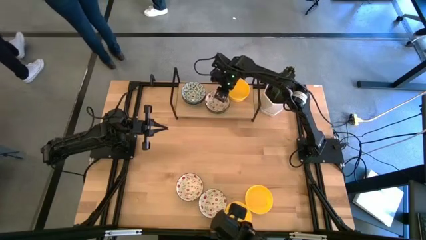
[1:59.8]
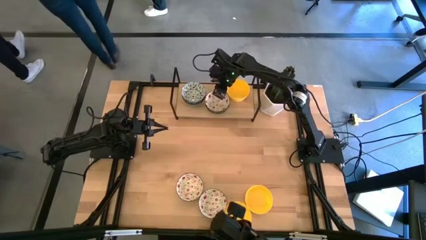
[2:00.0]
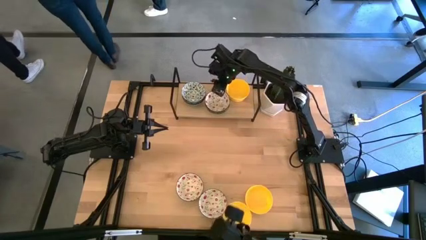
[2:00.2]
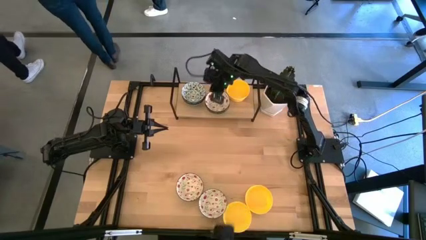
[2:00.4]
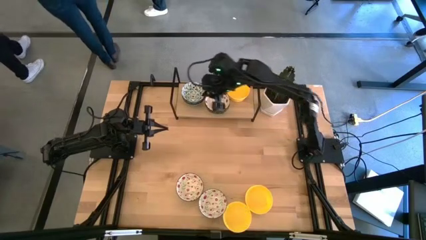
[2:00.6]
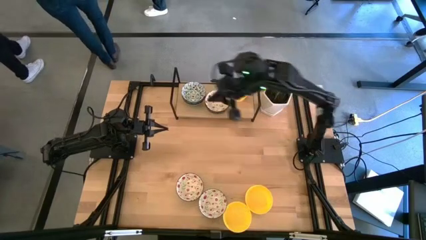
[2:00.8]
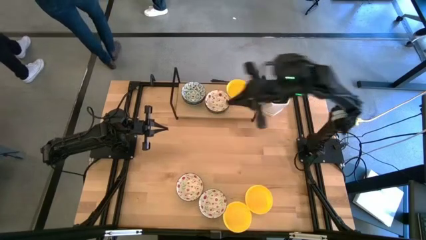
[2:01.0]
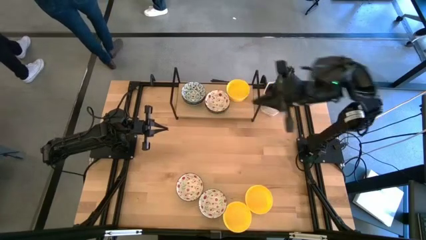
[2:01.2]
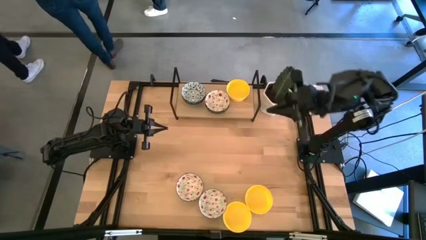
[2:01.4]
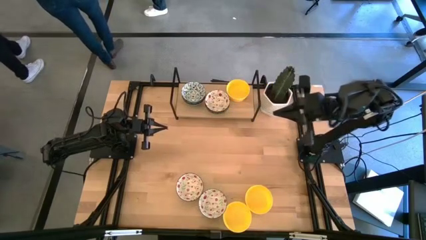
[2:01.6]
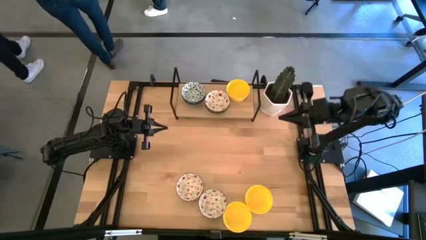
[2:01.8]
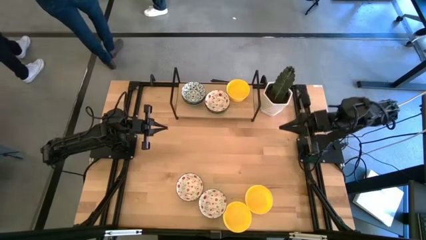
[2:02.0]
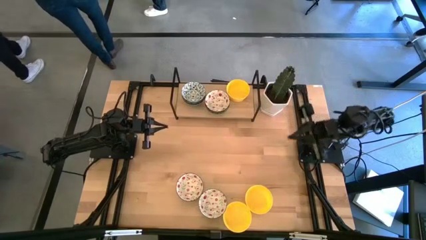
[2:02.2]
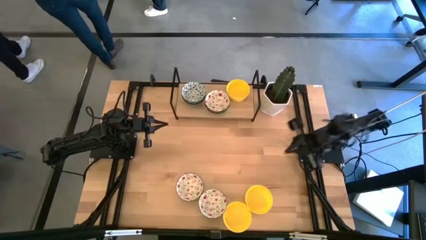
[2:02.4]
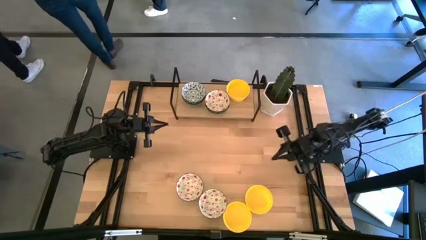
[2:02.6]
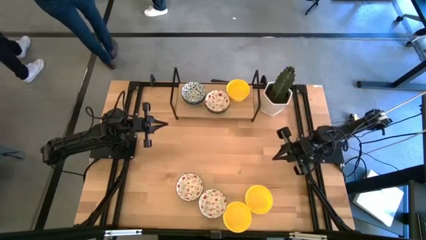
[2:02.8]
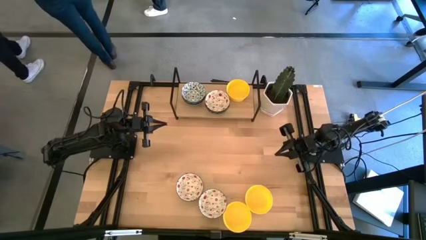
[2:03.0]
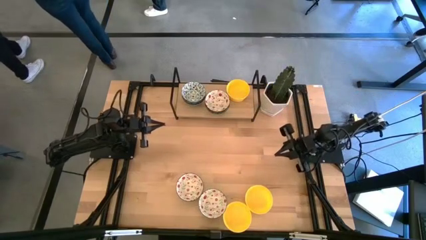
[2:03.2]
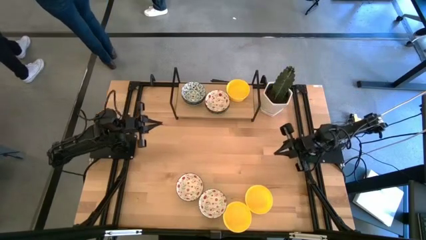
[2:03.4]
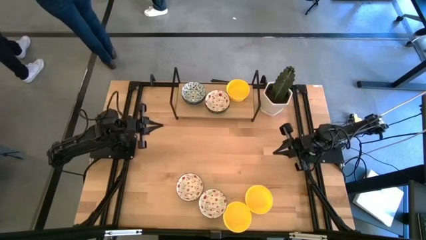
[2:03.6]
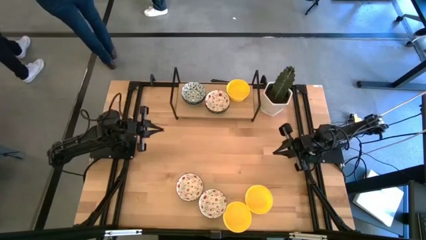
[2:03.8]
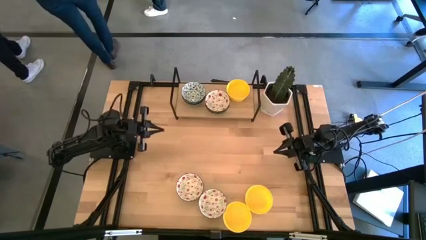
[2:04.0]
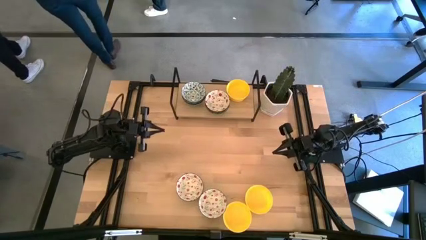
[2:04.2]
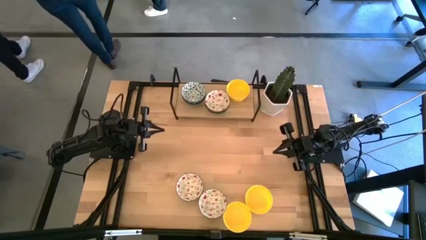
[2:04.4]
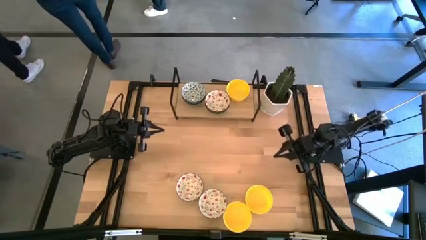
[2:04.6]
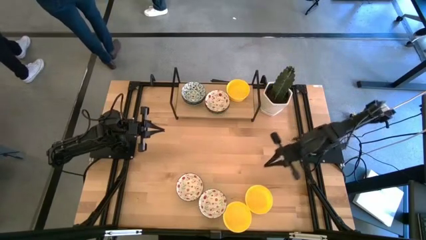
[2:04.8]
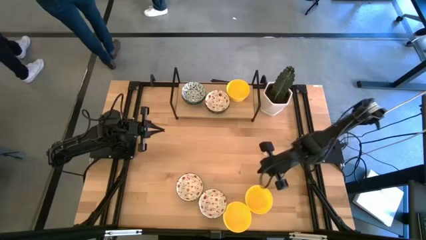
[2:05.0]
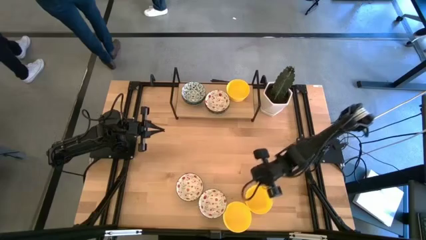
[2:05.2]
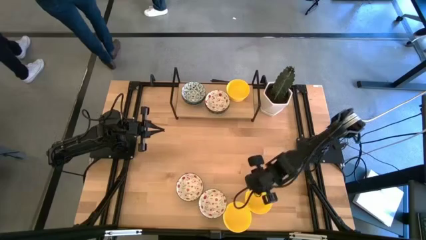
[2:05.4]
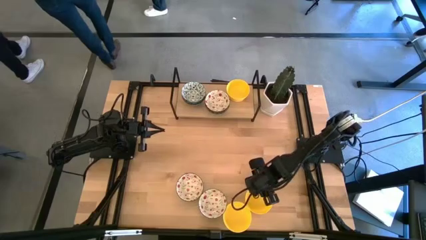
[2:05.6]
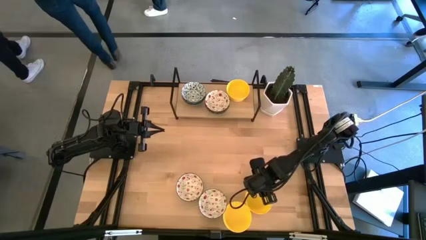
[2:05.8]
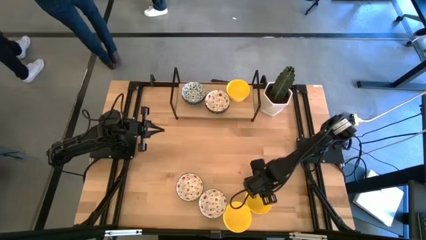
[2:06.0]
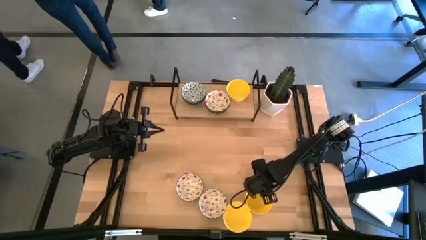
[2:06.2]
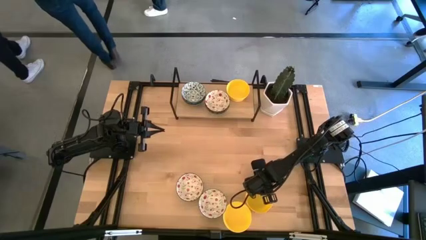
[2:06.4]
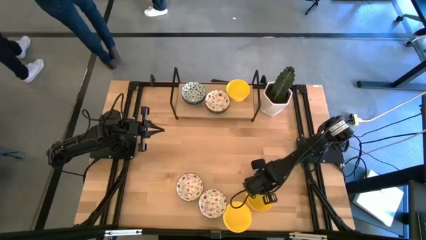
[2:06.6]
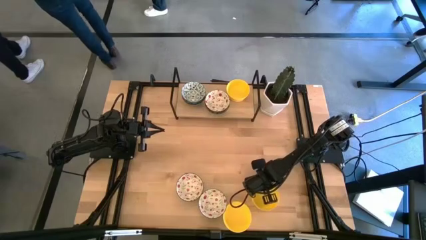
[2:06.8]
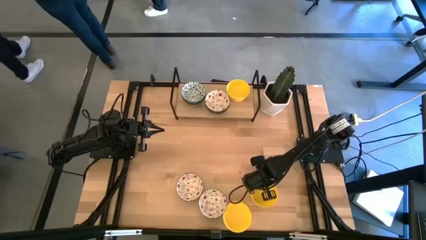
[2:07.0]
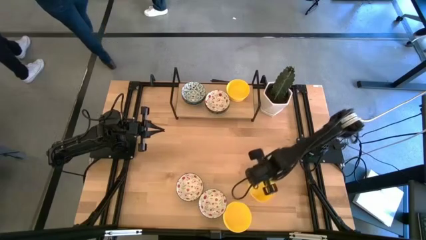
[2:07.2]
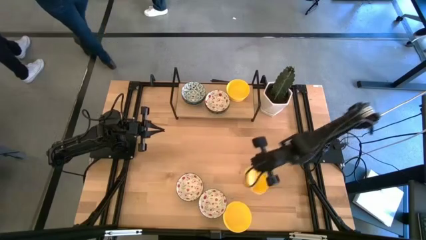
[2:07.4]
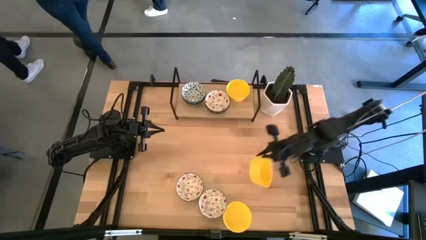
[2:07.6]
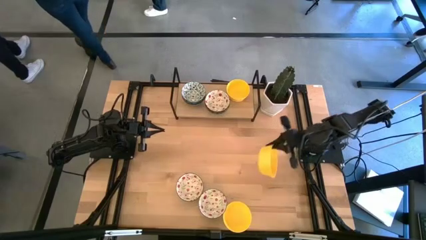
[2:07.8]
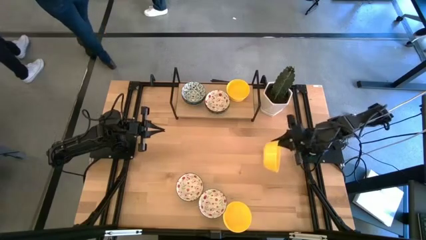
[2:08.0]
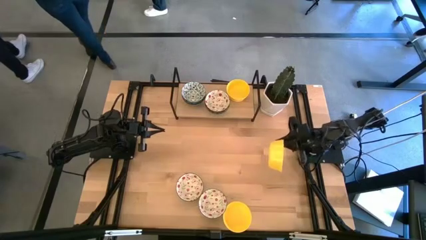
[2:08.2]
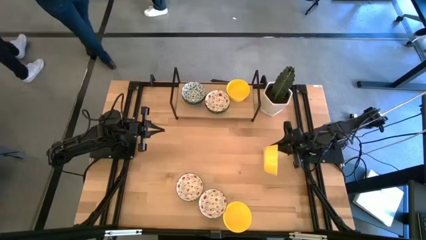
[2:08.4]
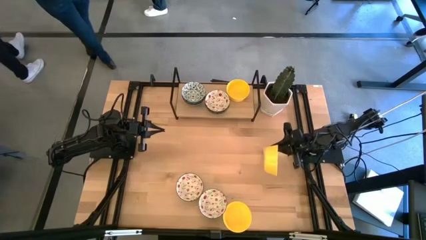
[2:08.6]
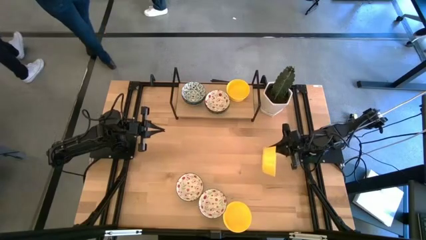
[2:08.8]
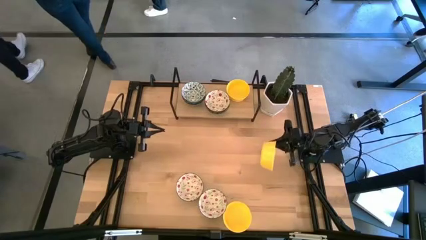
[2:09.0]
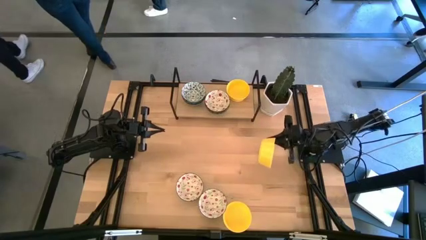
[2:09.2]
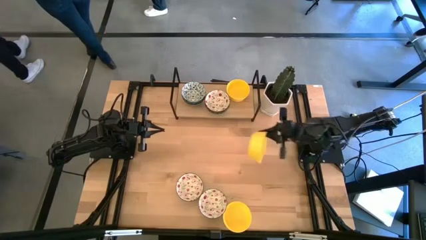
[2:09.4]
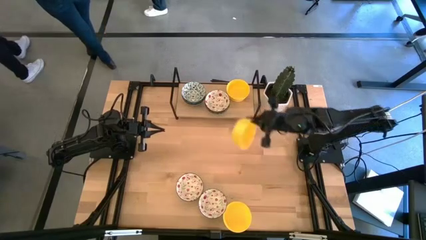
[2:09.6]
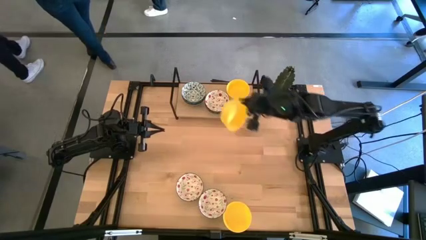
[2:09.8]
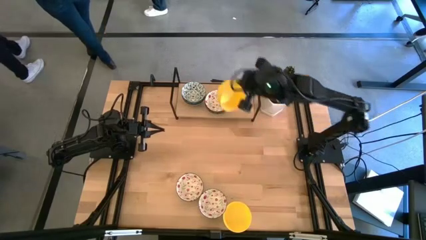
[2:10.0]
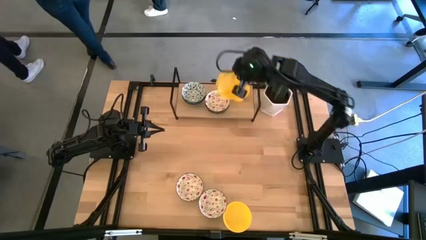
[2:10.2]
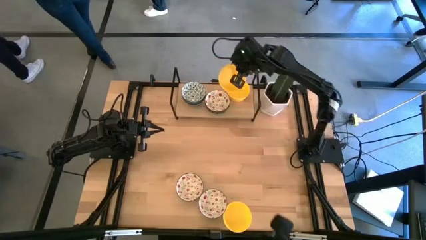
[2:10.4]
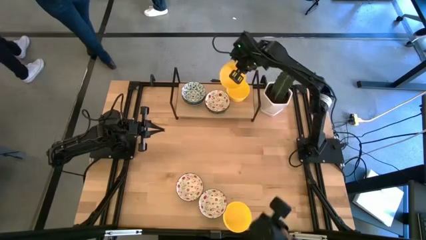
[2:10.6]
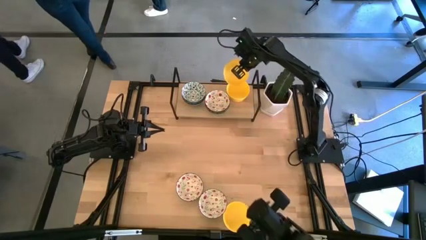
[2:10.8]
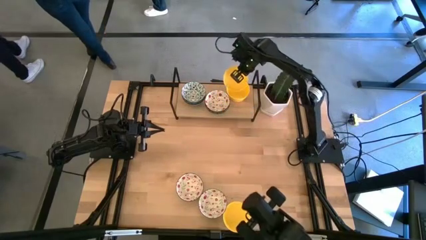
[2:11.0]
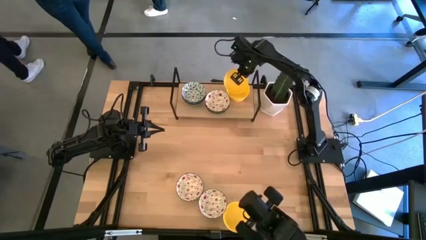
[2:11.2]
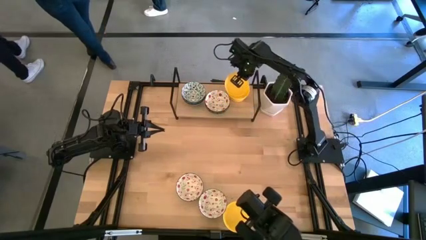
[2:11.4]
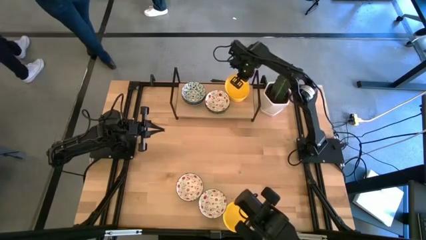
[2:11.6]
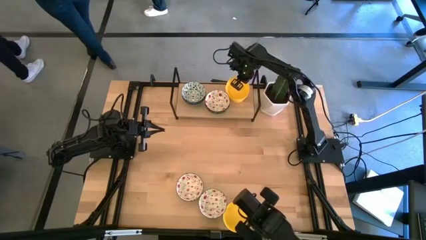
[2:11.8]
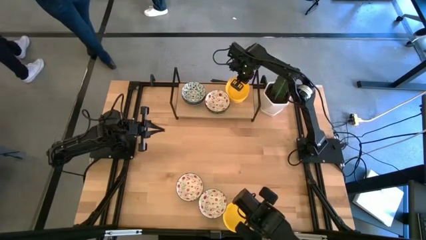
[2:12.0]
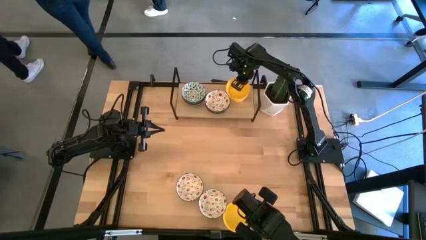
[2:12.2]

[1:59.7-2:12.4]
Task: Pick & Place Mini bowls
Stack the yellow bowl on the yellow bowl on the shelf

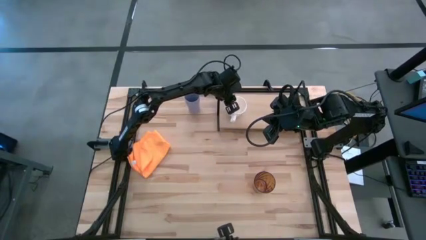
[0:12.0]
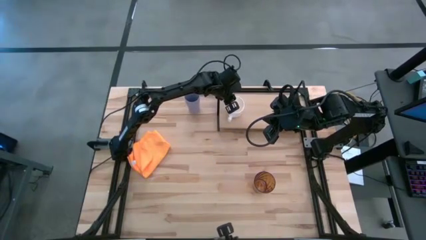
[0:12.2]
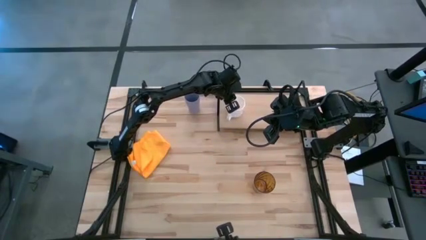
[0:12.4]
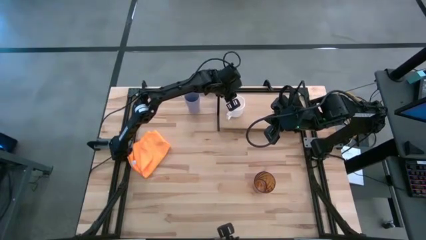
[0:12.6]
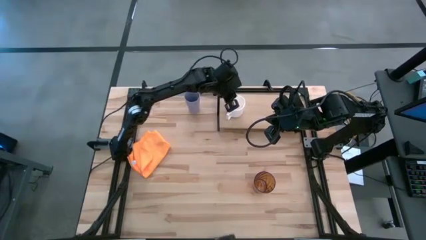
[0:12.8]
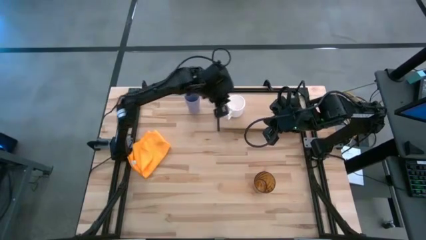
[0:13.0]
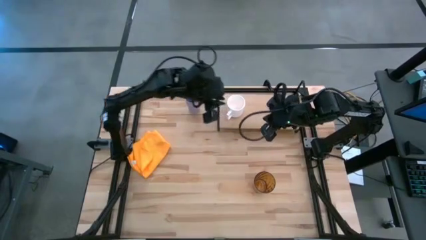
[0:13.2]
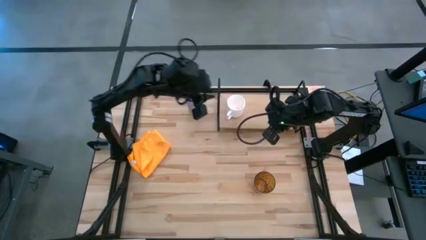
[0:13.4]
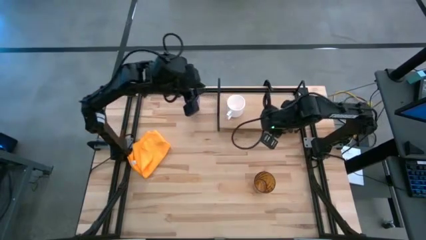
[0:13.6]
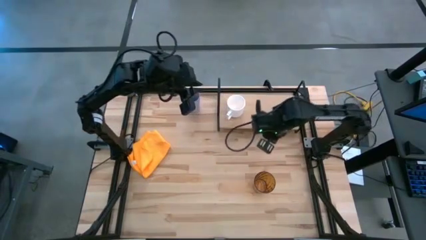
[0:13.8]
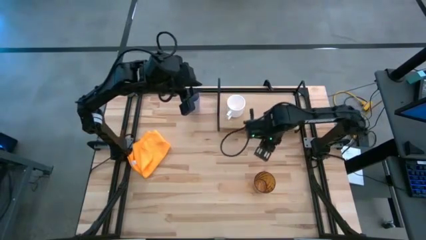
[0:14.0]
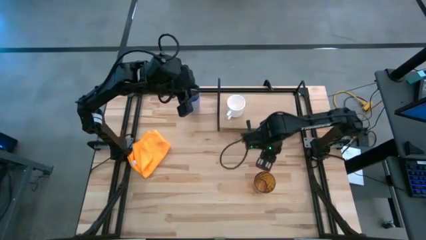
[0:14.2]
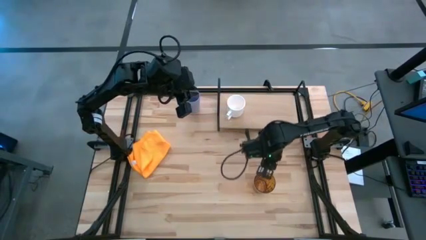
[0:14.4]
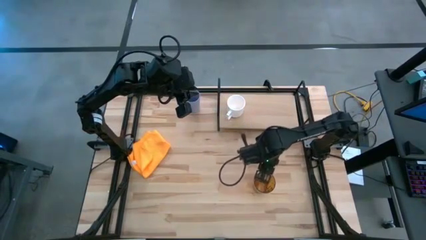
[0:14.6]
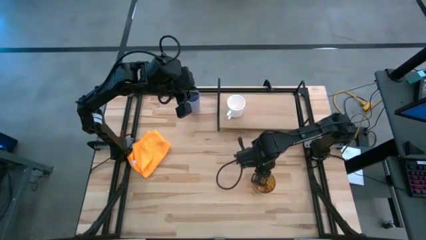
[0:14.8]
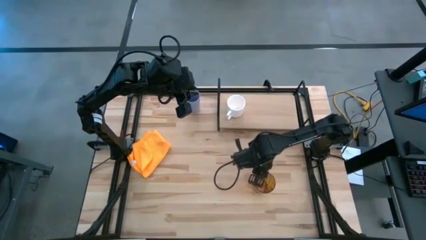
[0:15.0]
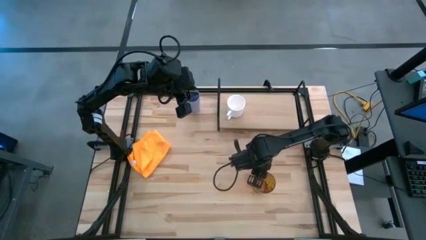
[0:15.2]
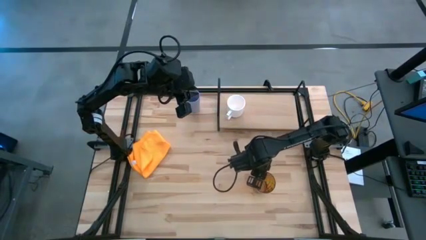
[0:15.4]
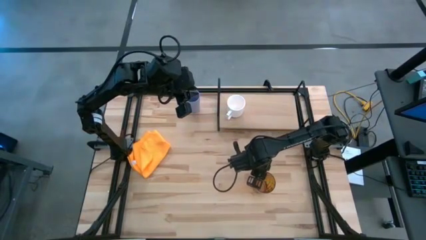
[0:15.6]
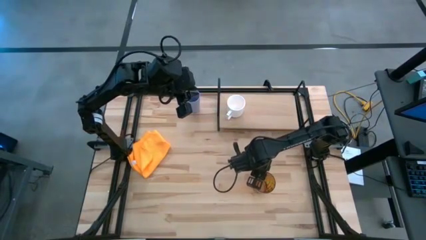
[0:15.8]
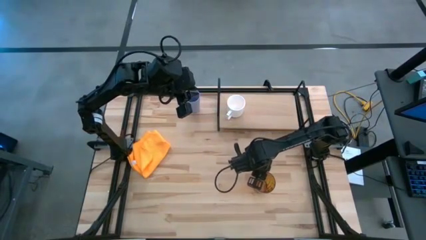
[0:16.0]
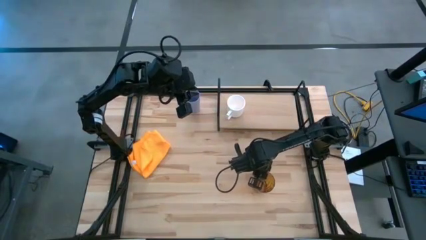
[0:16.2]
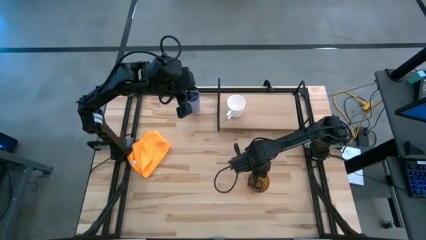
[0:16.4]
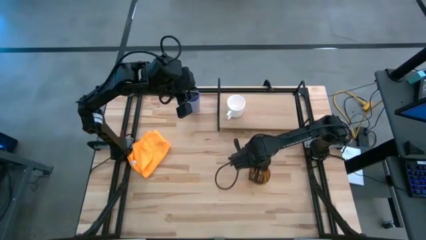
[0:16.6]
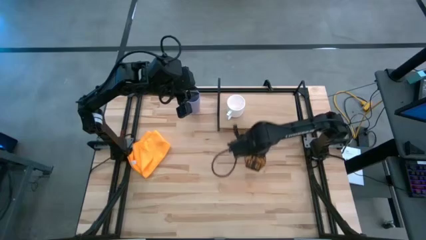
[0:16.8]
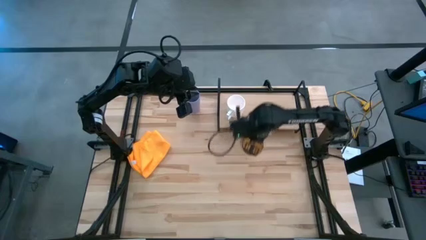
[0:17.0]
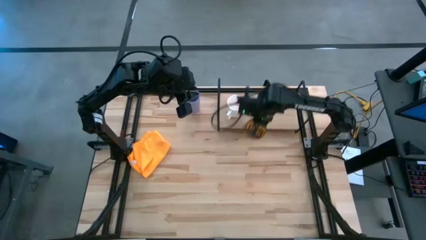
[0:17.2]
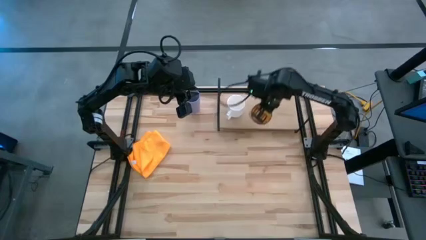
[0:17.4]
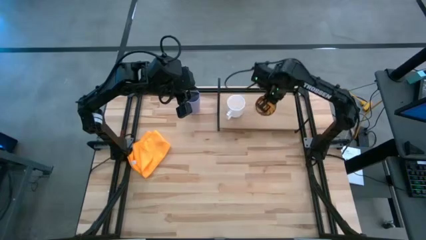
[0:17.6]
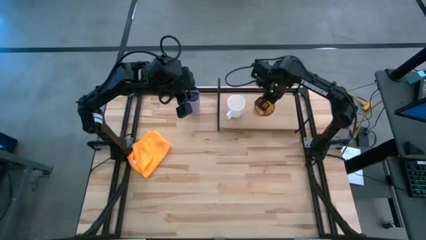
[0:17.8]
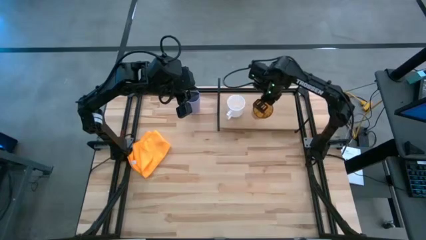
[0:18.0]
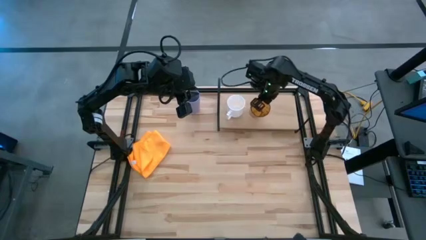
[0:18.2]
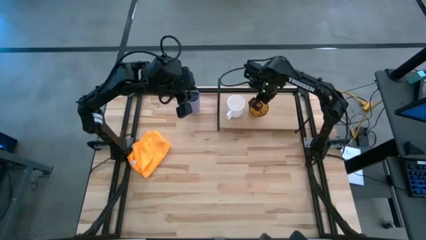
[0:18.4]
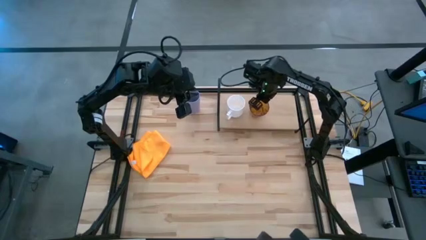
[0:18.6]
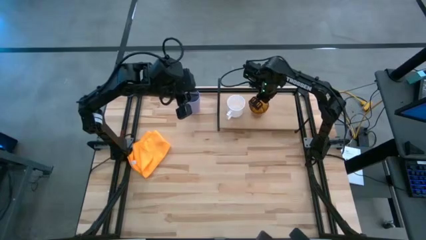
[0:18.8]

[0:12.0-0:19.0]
Task: Stack small to large cups/mugs on shelf
Put the brown cup on the shelf
